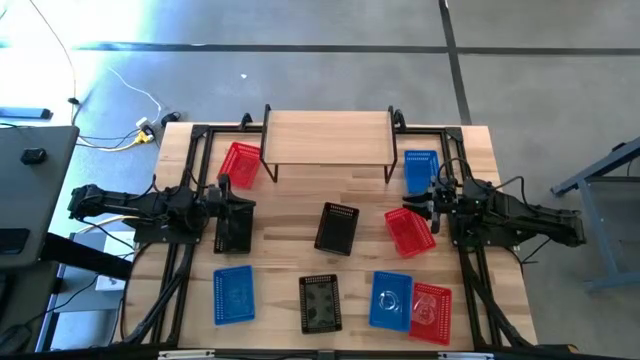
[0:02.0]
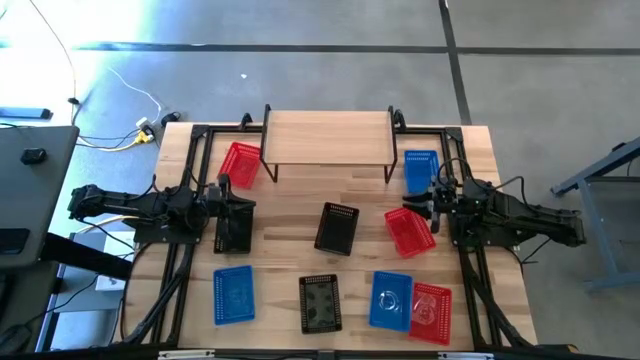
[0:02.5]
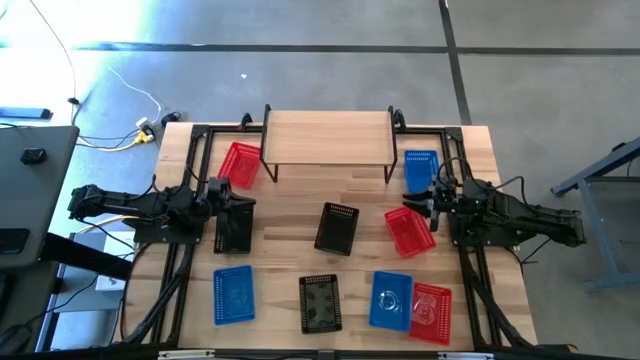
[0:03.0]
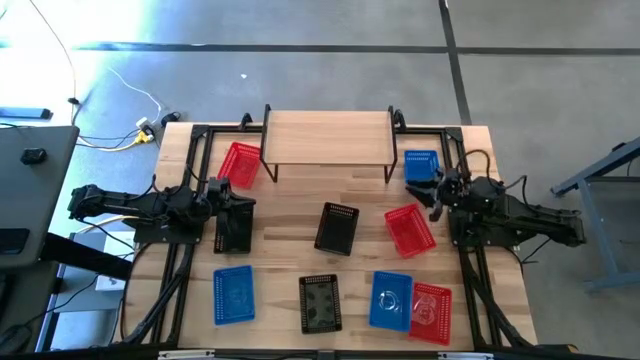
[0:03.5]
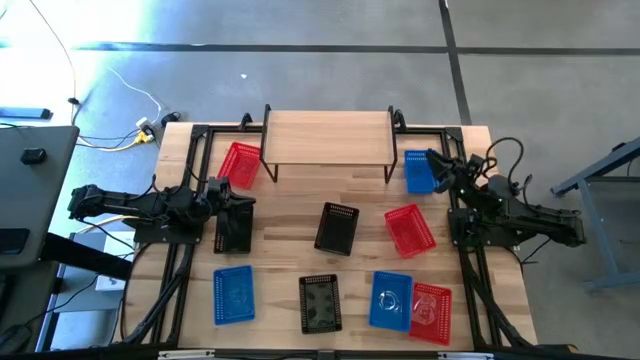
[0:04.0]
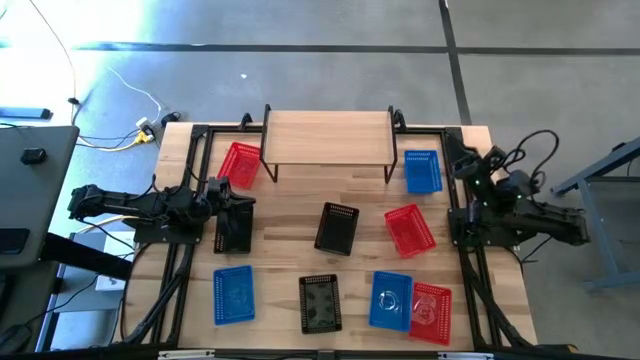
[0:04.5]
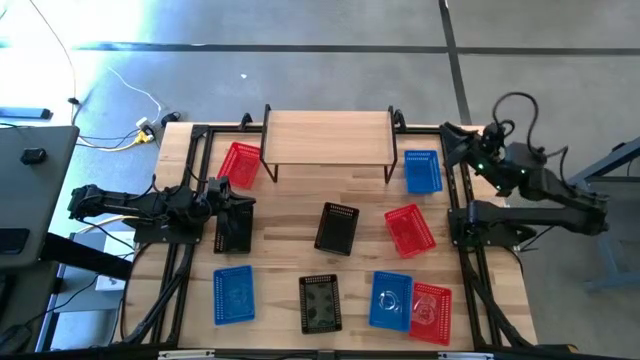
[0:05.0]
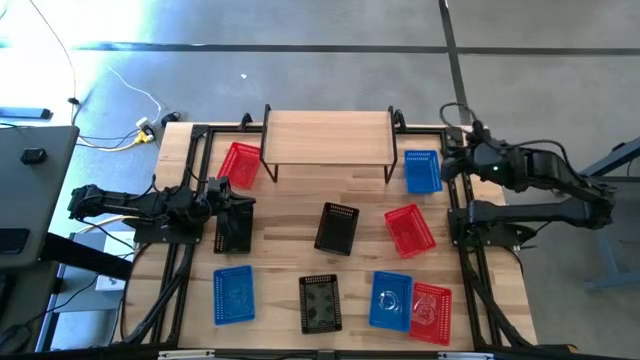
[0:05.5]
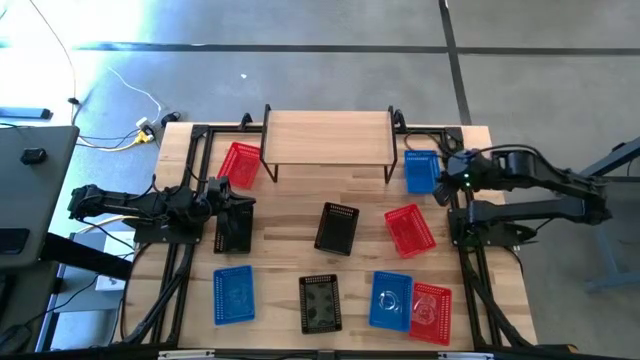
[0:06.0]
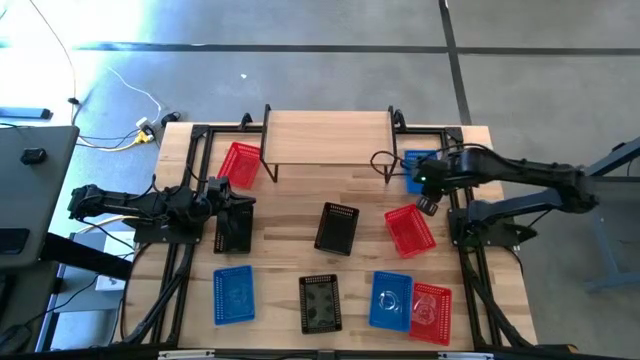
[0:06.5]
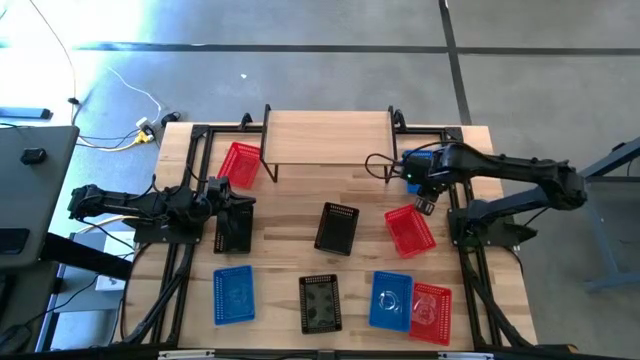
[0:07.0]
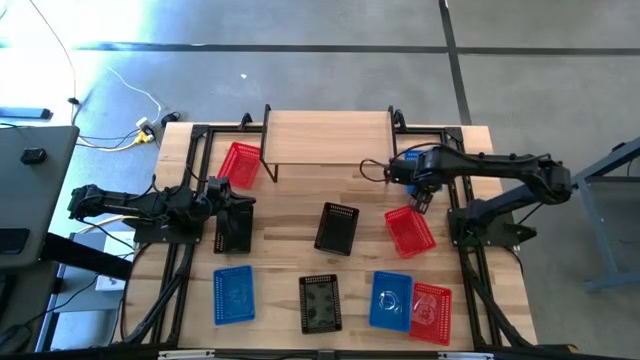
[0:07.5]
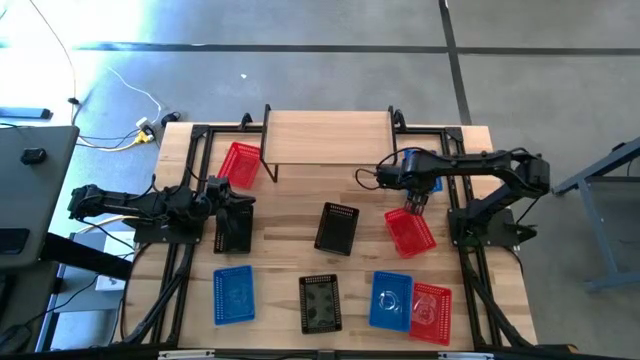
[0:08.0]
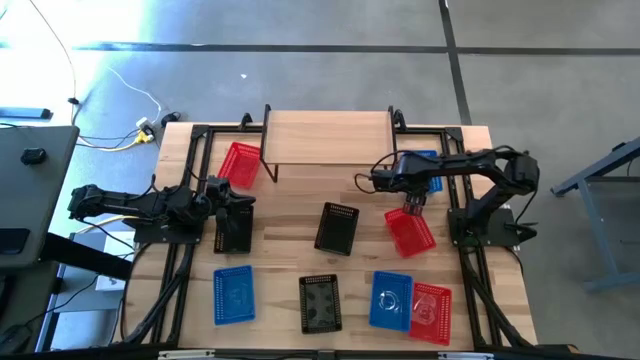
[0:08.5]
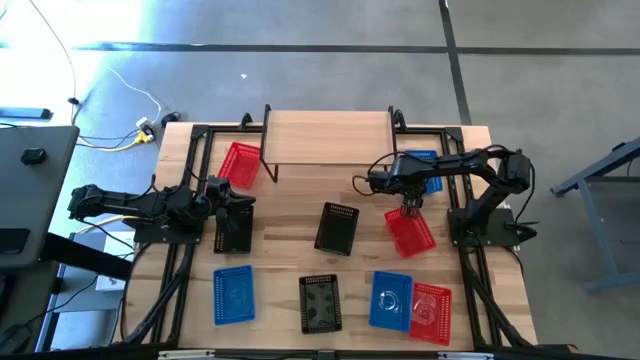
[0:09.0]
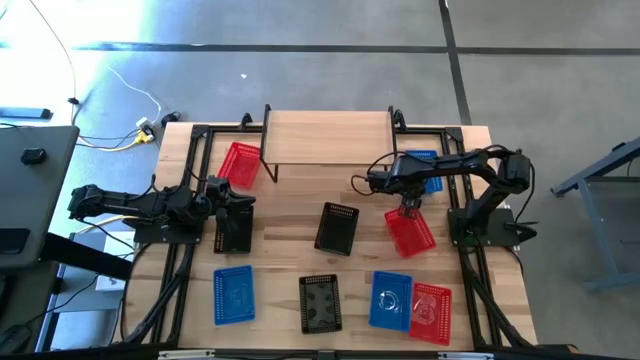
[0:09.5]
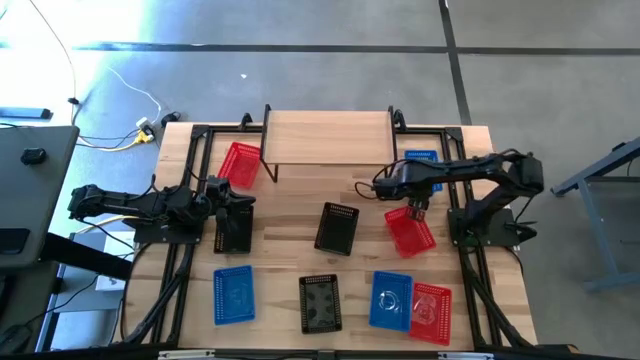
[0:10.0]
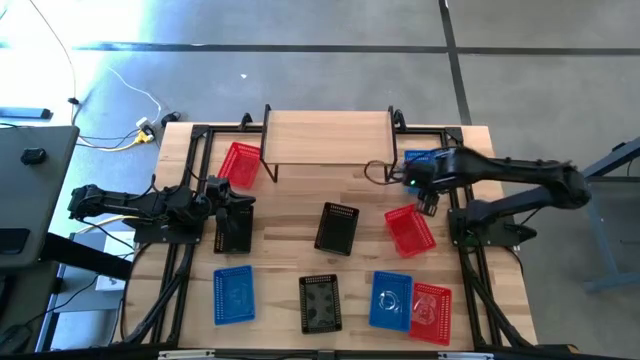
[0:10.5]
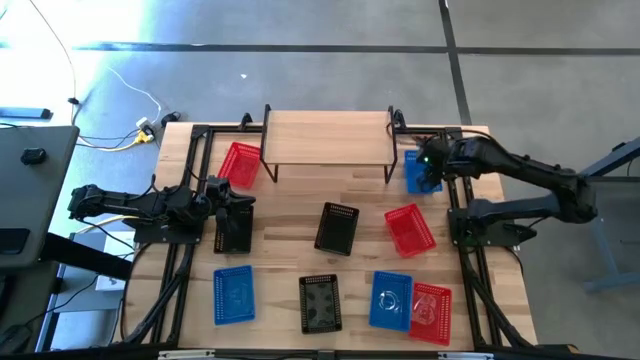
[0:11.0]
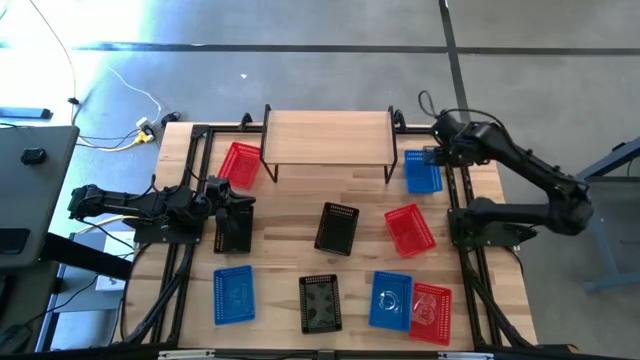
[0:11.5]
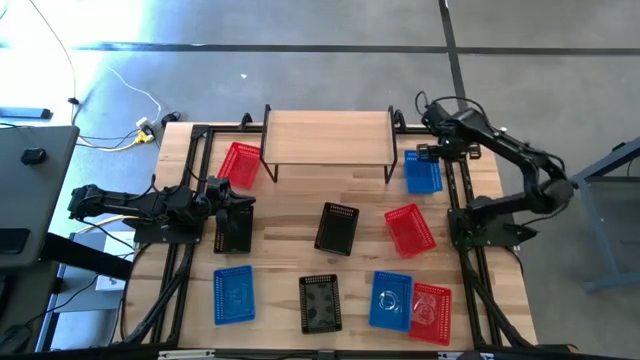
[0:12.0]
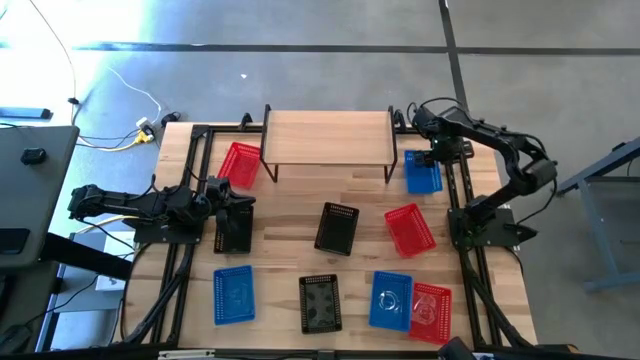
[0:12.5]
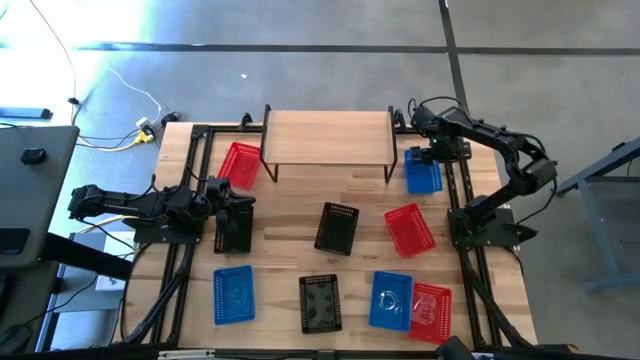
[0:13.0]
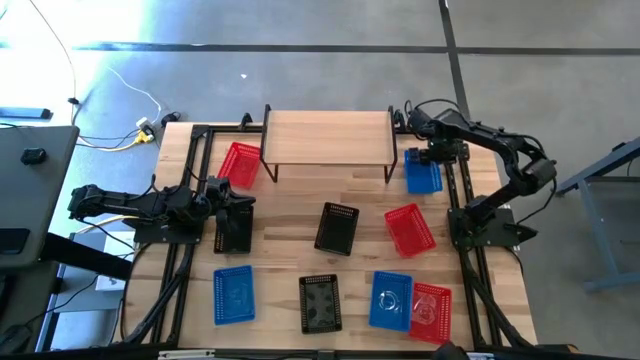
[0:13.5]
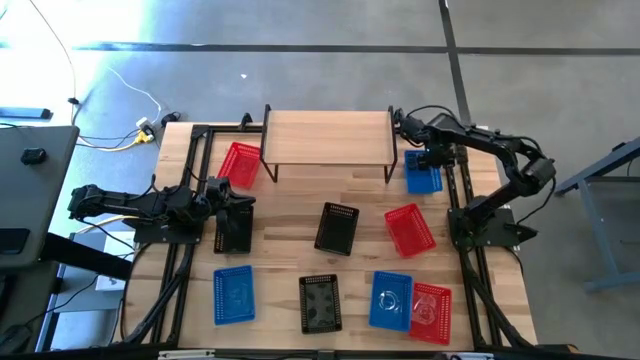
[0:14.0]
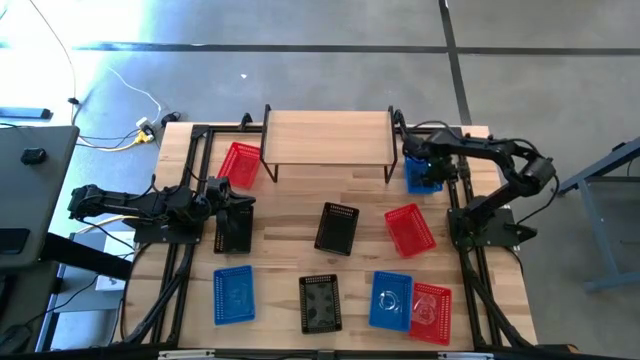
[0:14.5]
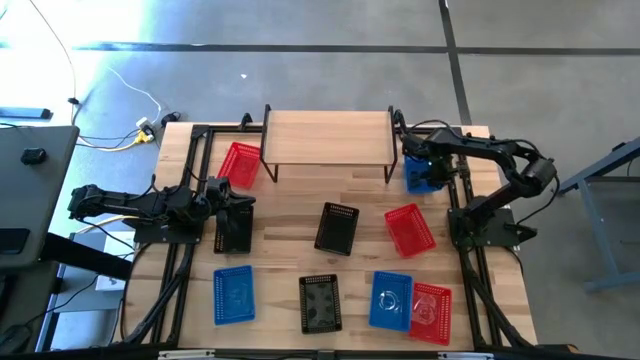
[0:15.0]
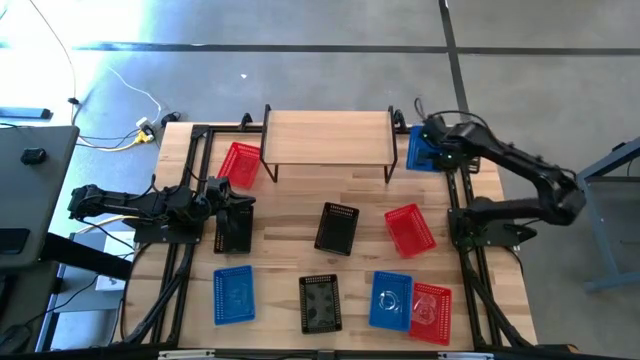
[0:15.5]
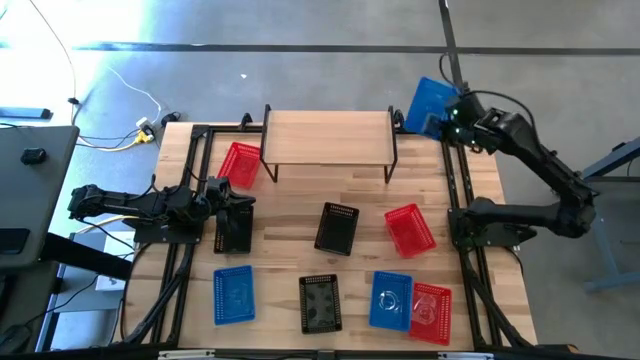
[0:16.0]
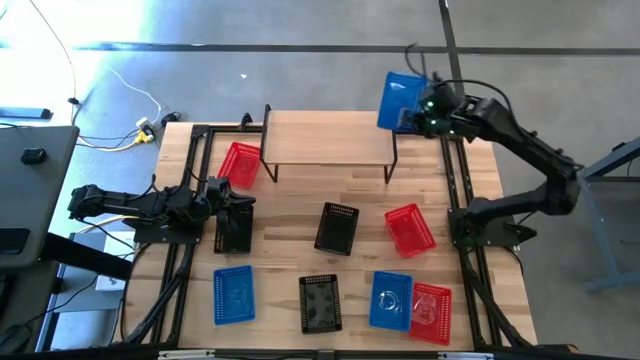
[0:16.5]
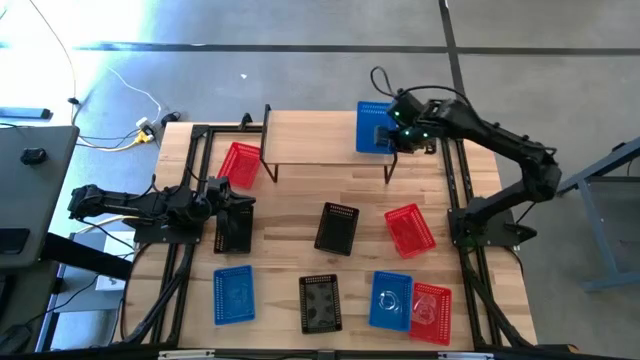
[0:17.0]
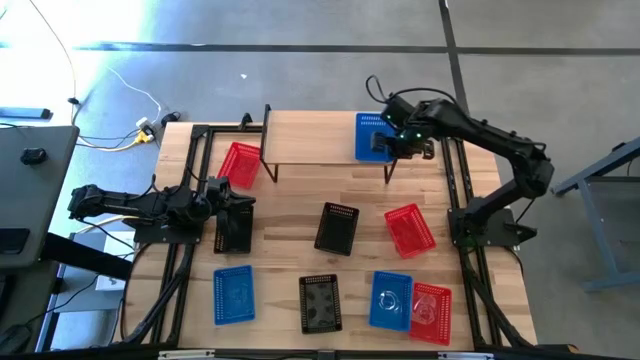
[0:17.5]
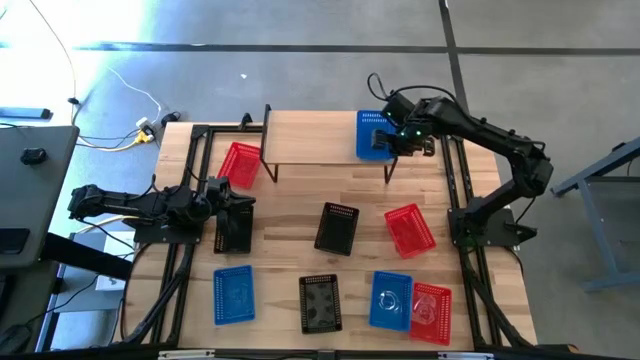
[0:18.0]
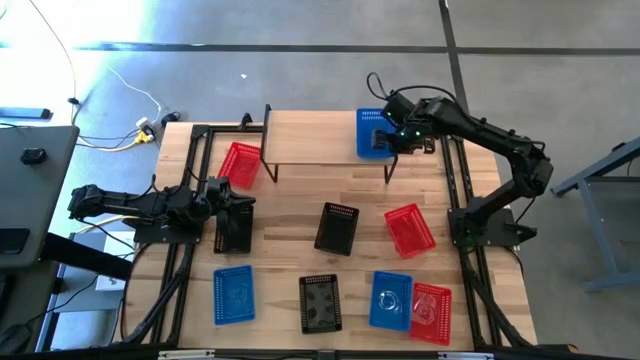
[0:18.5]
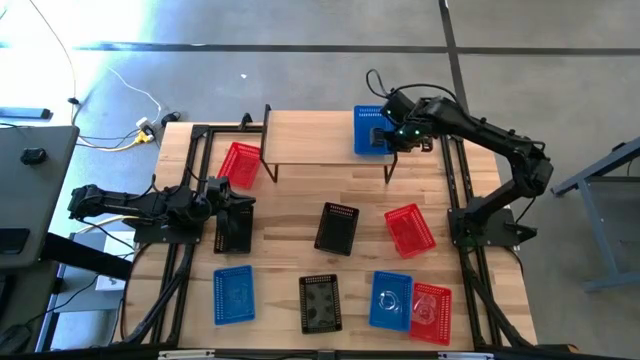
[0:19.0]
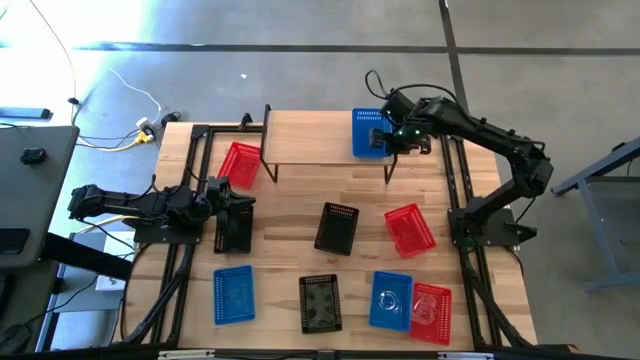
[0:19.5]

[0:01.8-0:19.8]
Task: Stack baskets on shelf by color
Put the top blue bin on the shelf
